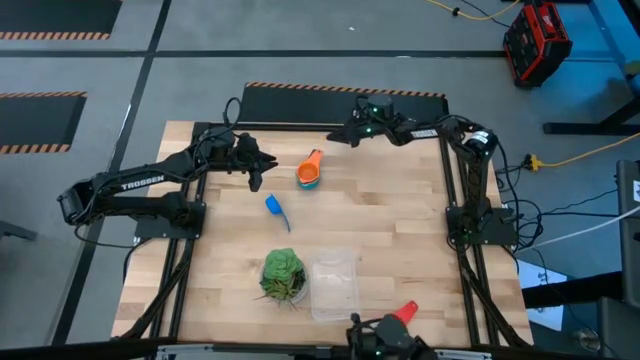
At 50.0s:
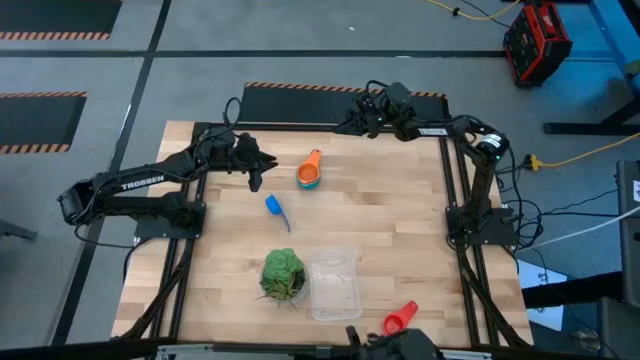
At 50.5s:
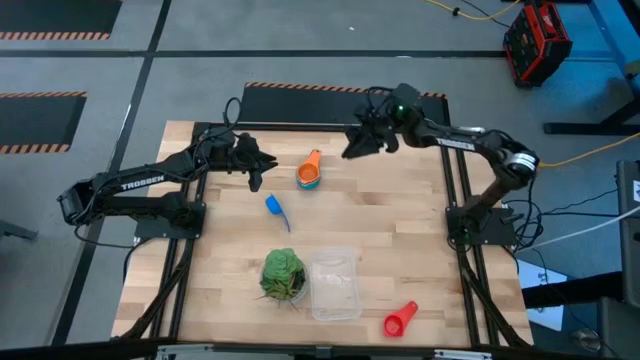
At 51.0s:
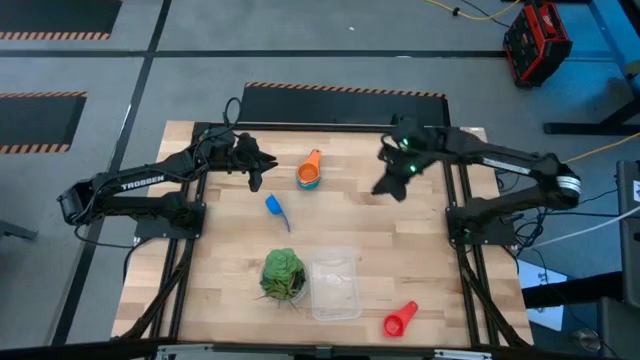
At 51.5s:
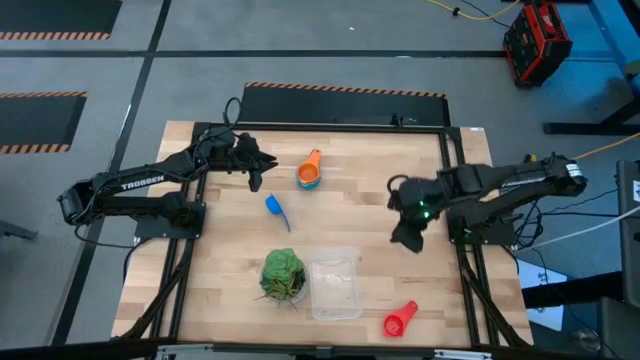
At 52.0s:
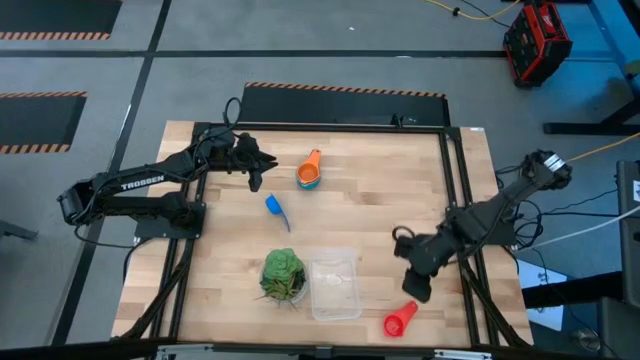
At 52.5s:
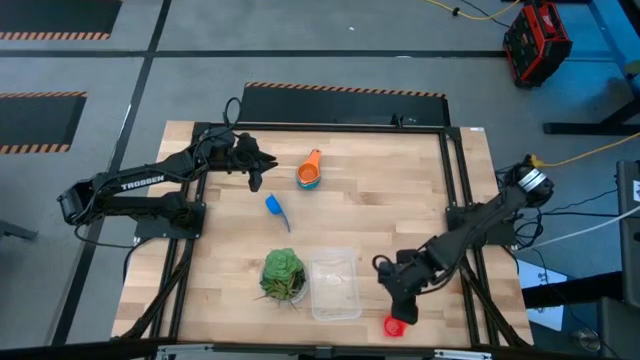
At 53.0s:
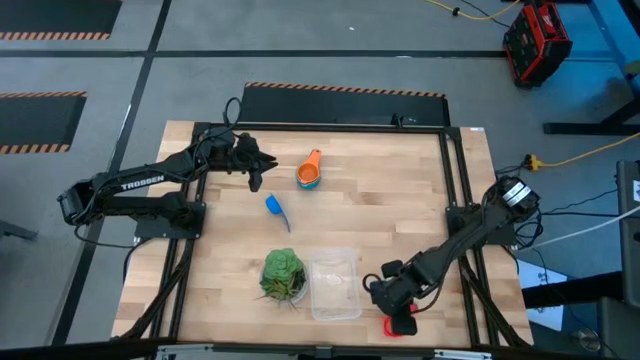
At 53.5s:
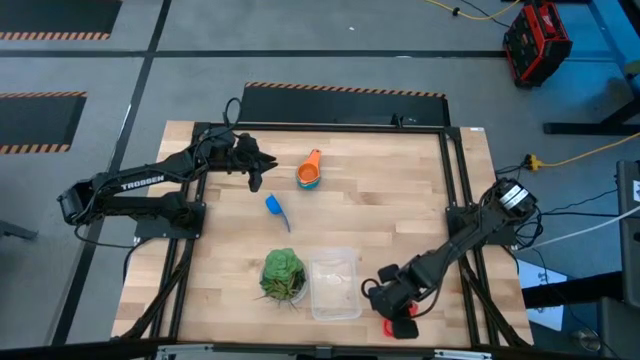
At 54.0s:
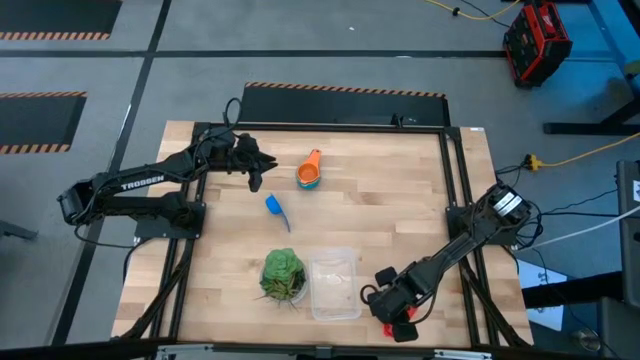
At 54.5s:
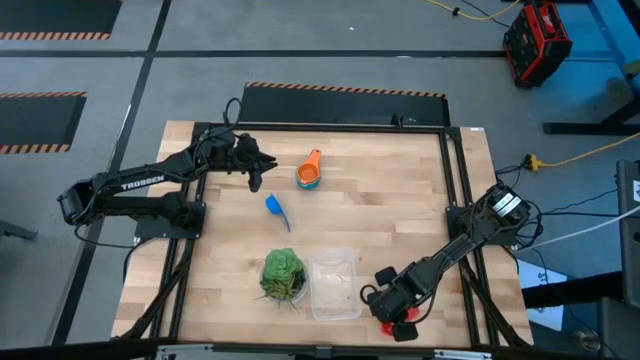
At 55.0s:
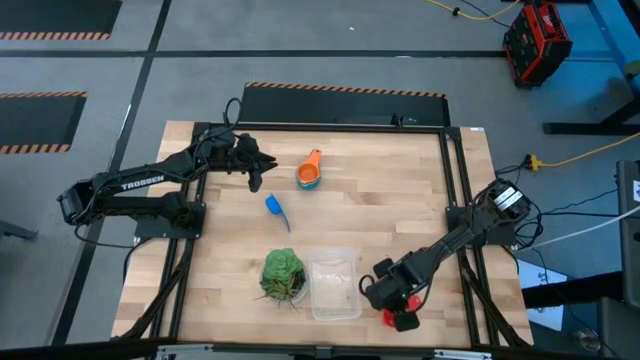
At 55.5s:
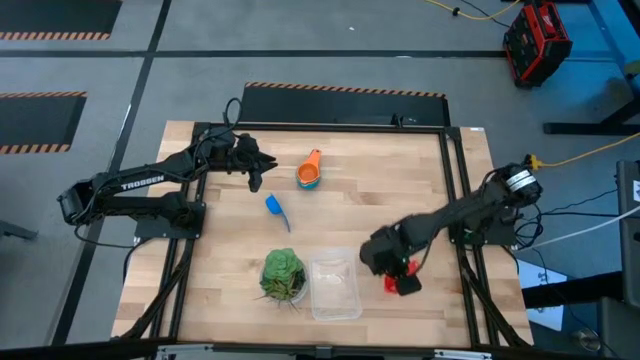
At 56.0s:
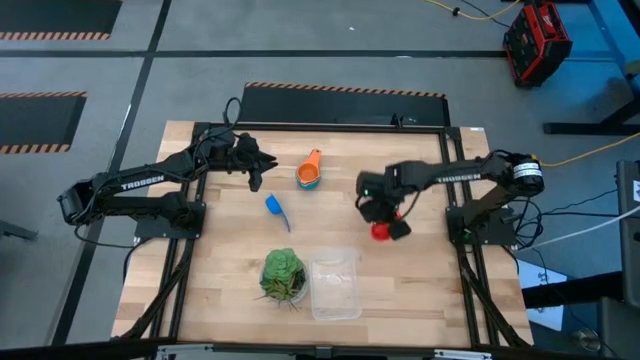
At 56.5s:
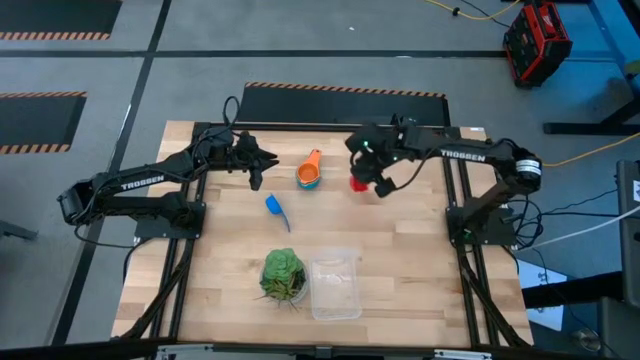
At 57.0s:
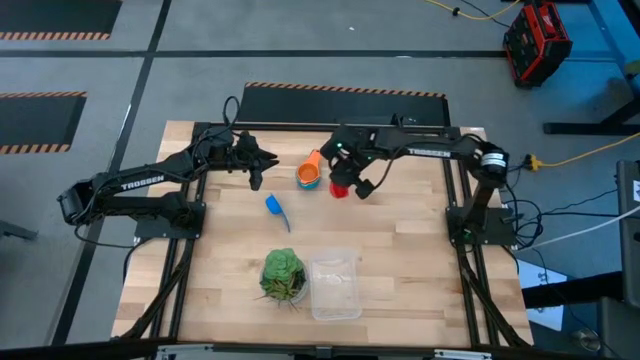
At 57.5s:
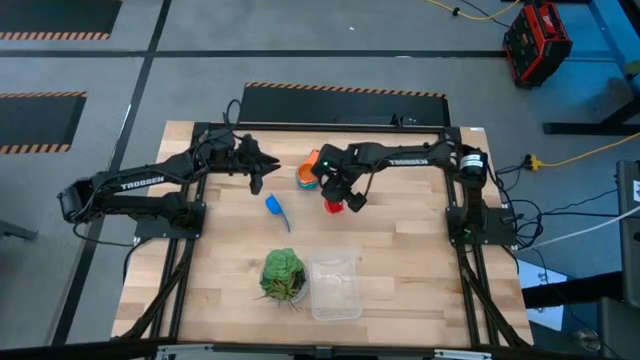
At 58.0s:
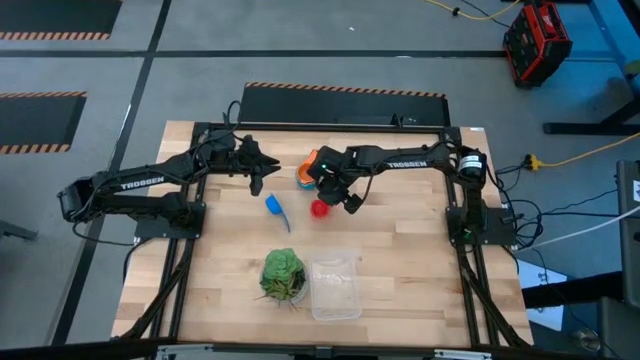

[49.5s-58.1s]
Task: Nest measuring cups in basket
Move the red measuring cup to the center of the table

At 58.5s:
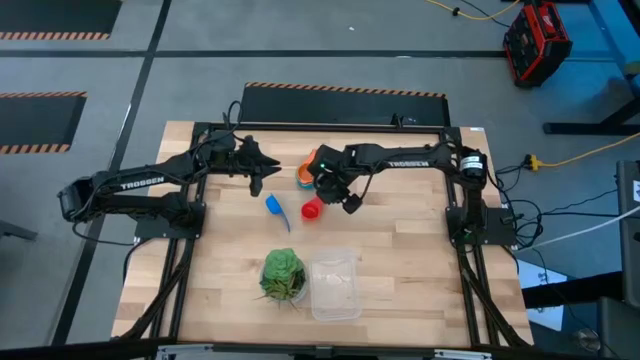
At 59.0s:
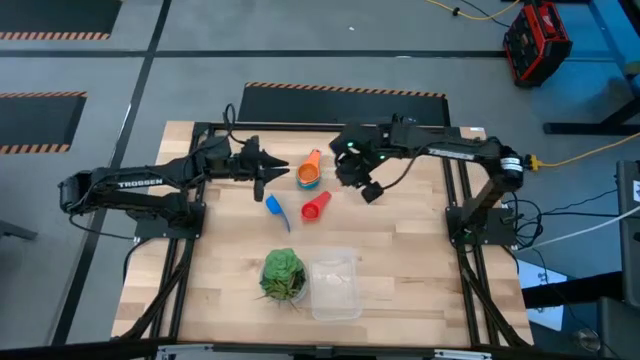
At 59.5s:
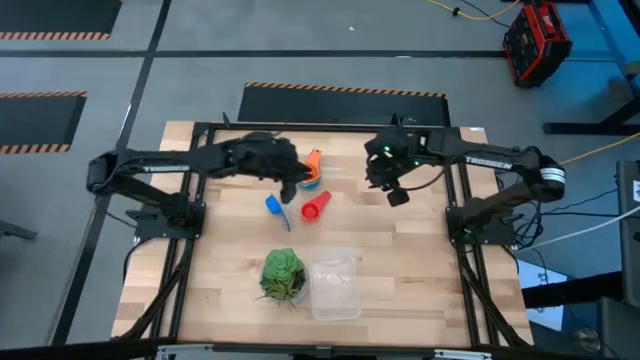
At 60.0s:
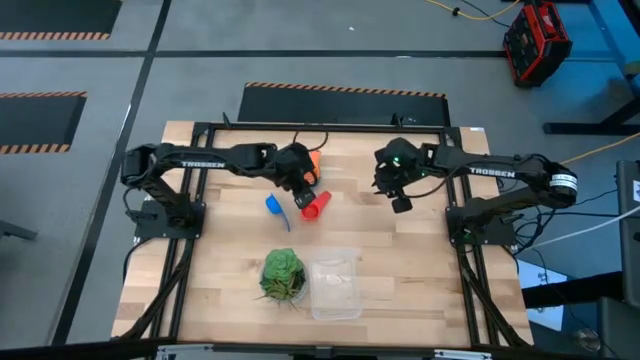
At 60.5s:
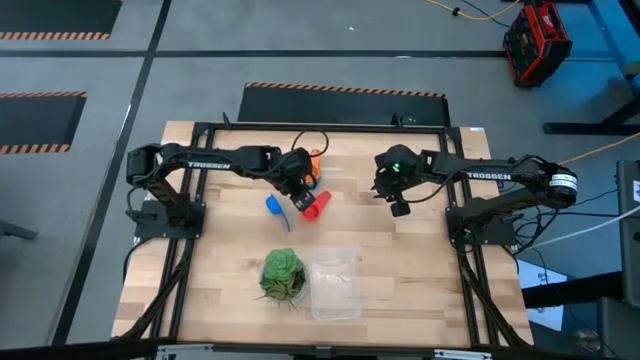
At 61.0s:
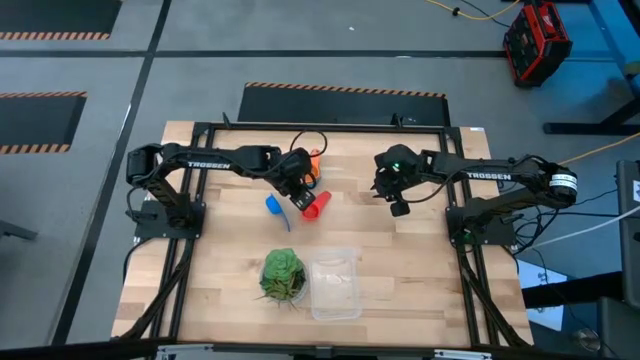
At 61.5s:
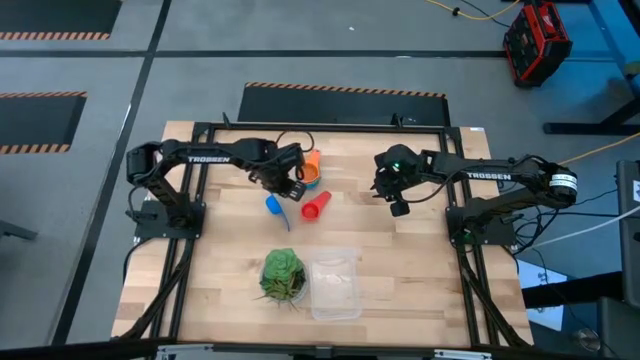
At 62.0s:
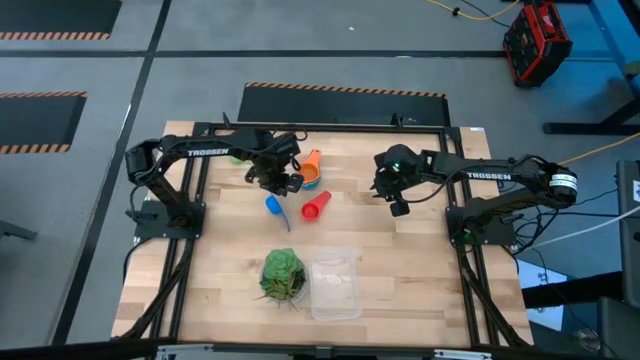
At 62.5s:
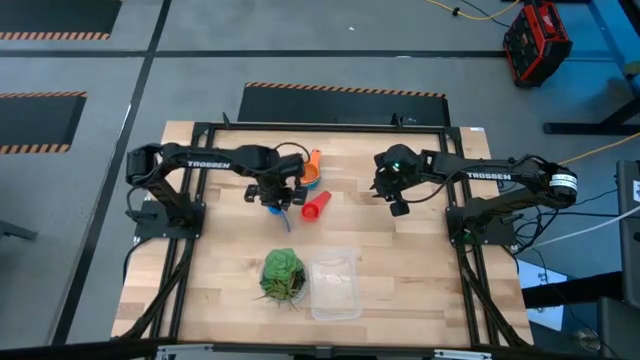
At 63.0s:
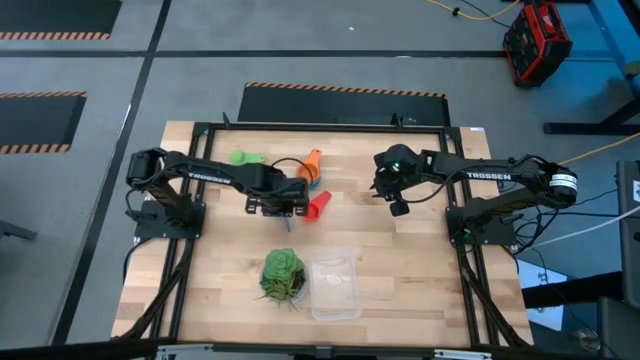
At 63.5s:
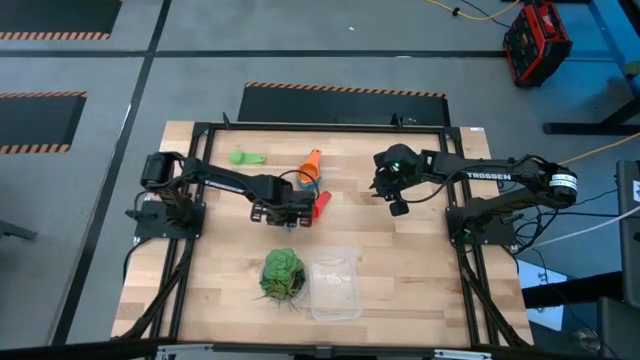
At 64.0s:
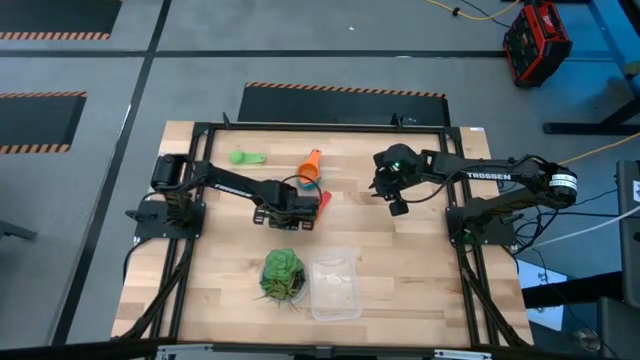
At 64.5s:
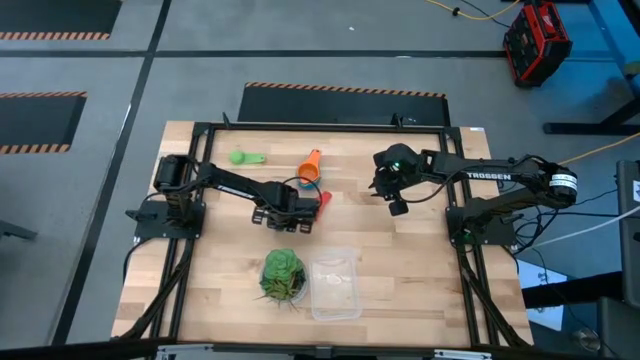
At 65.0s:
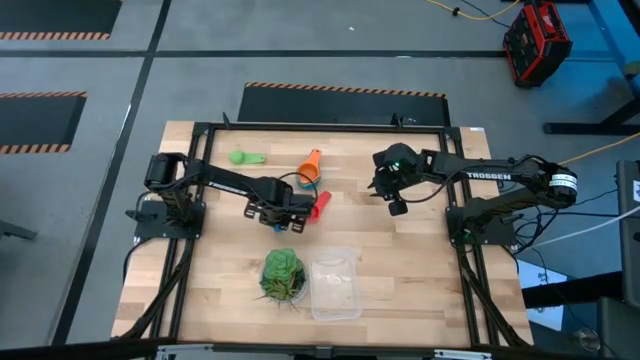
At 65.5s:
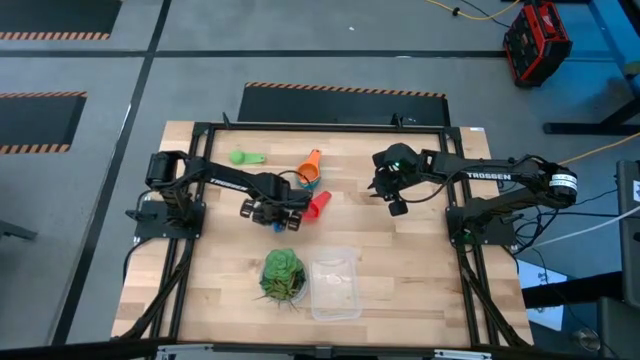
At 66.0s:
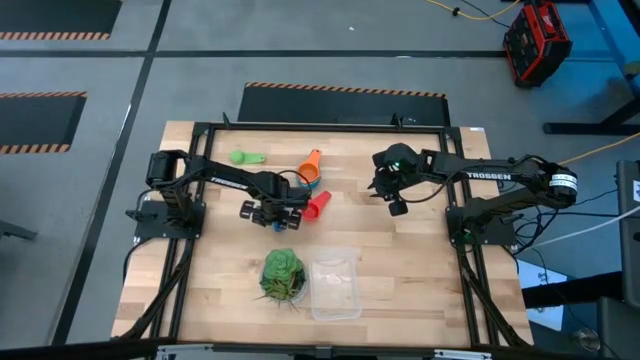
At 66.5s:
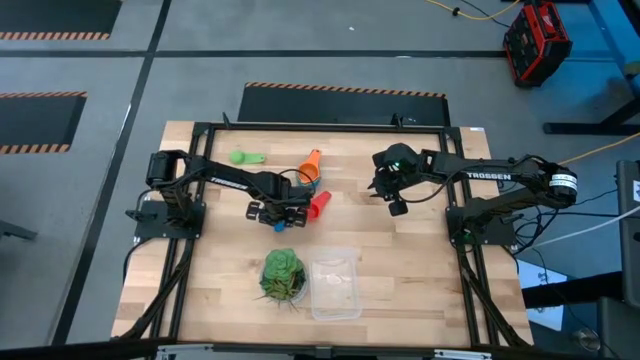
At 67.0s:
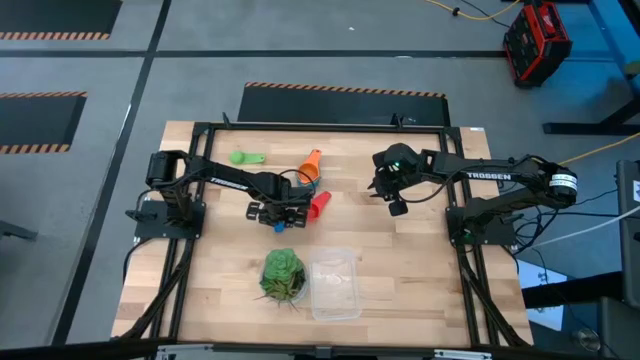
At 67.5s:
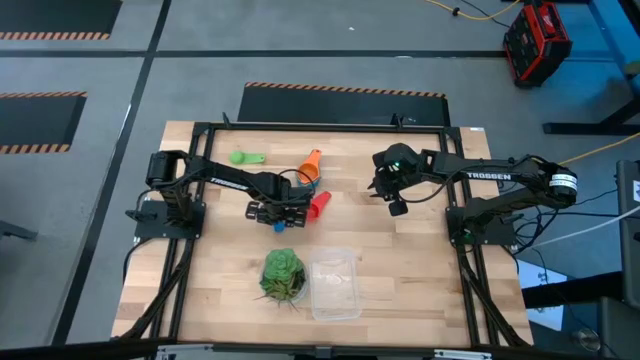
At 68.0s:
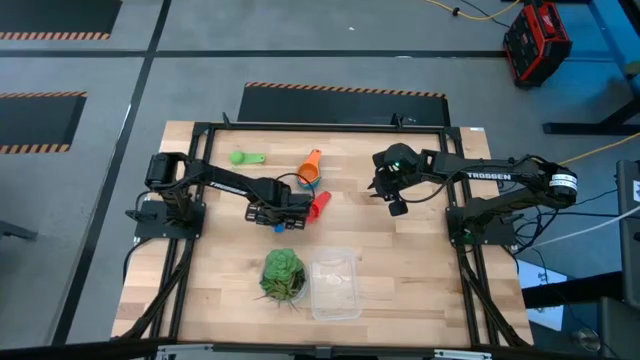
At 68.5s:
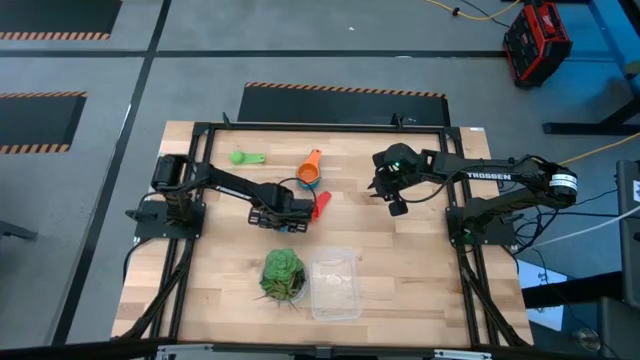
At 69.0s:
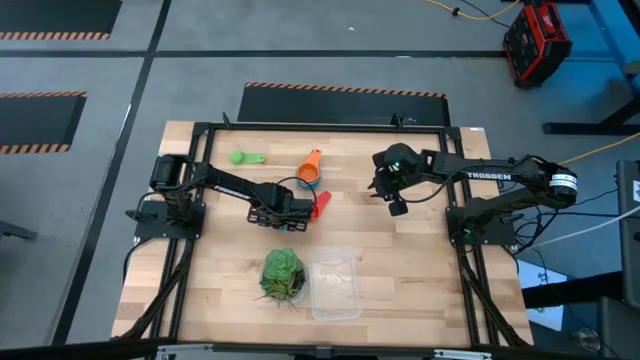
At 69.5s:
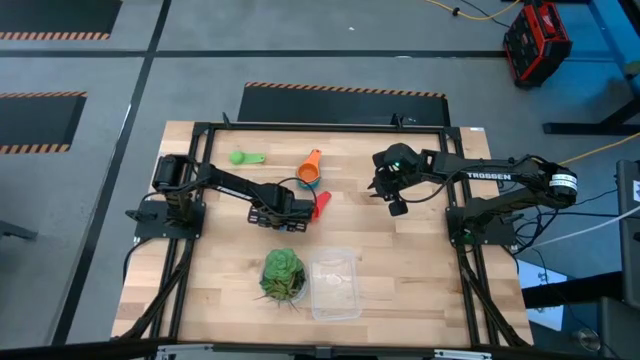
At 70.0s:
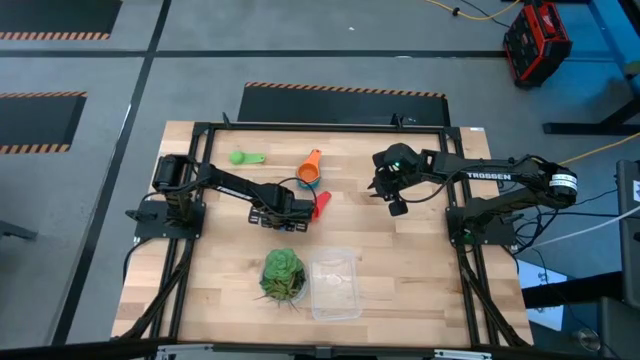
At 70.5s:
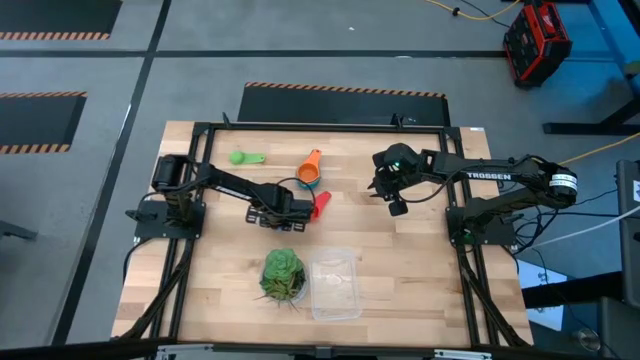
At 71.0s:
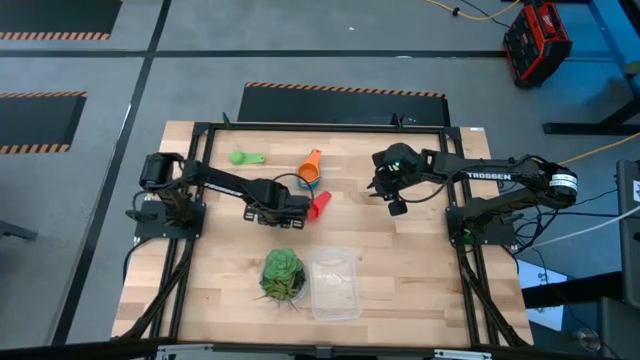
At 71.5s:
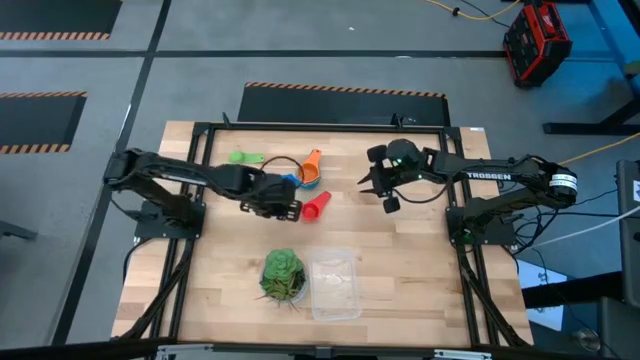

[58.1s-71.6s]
Stack the blue measuring cup on top of the orange measuring cup
